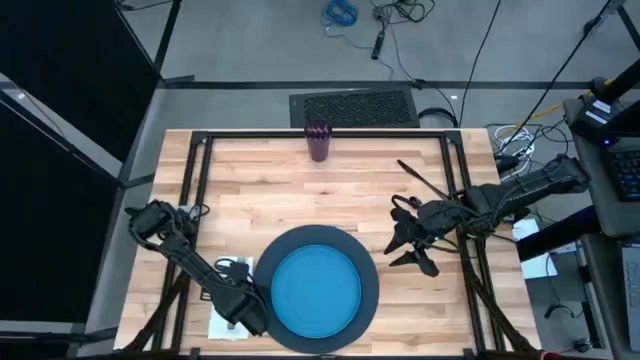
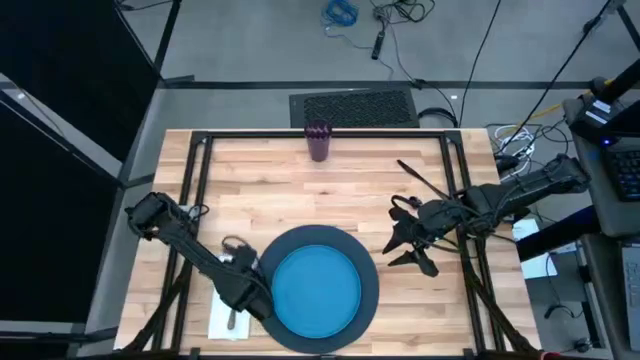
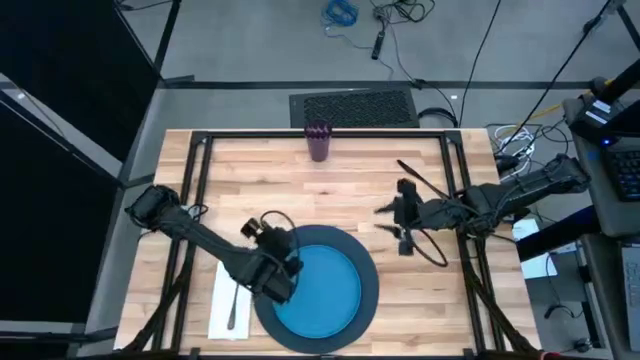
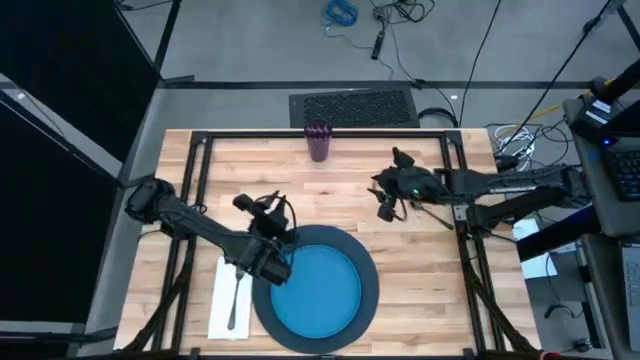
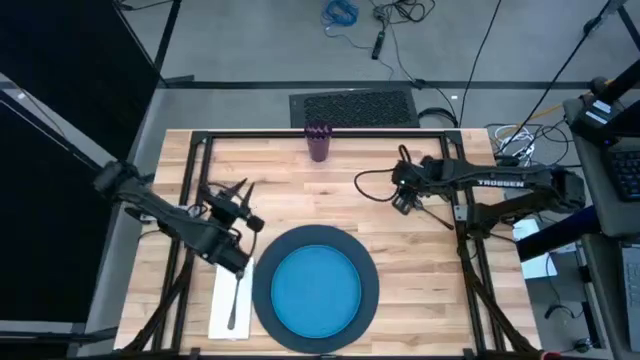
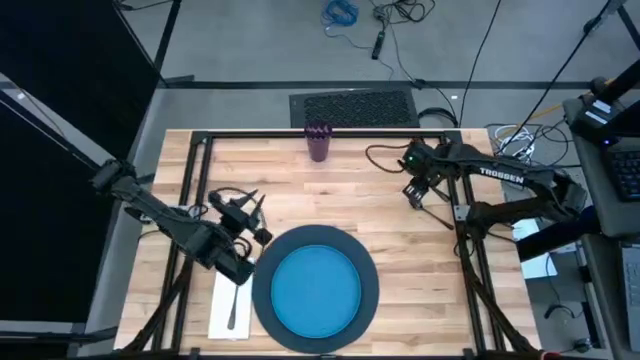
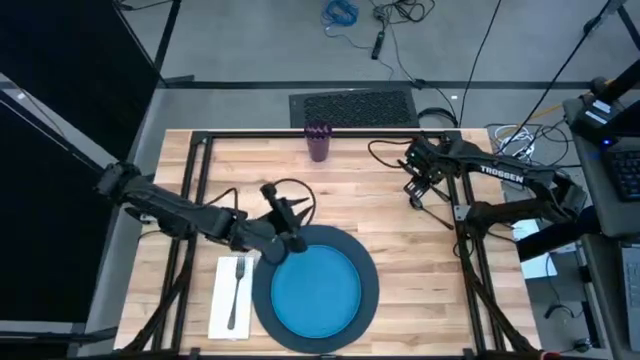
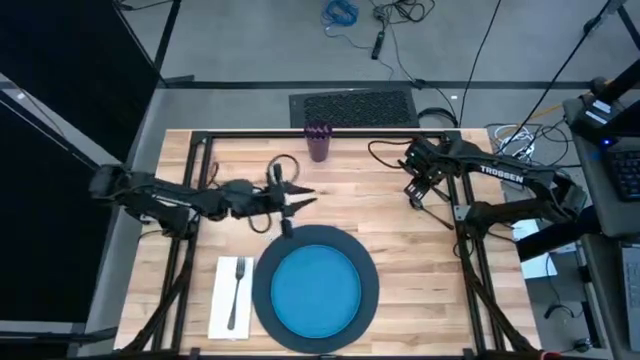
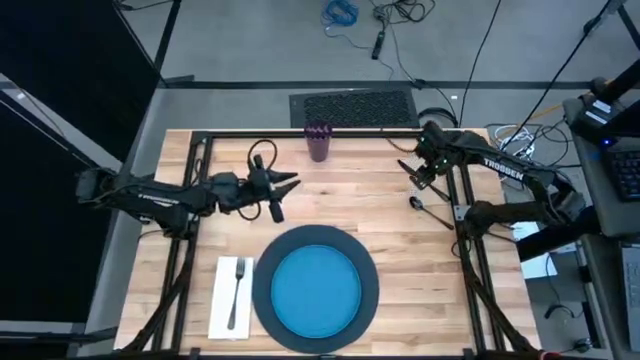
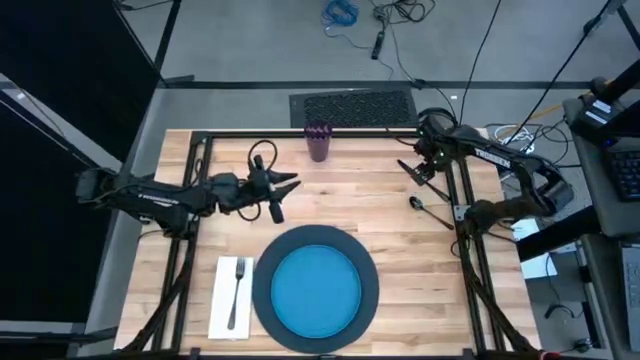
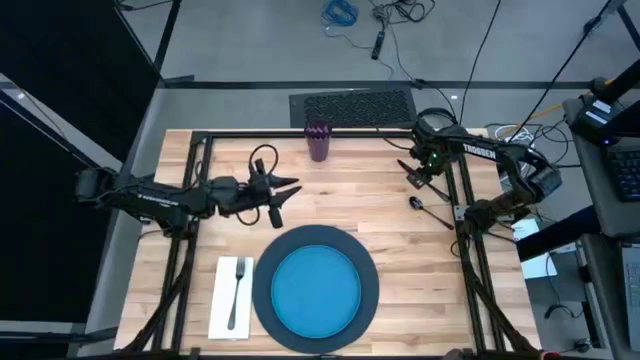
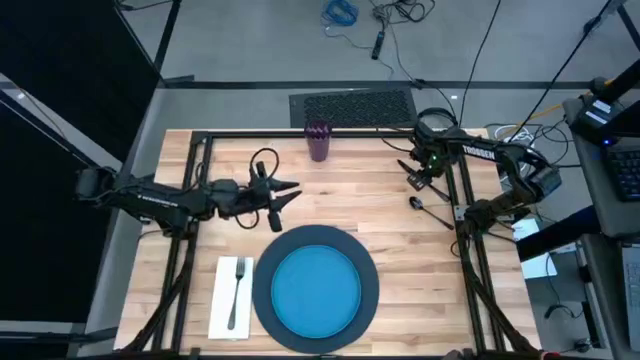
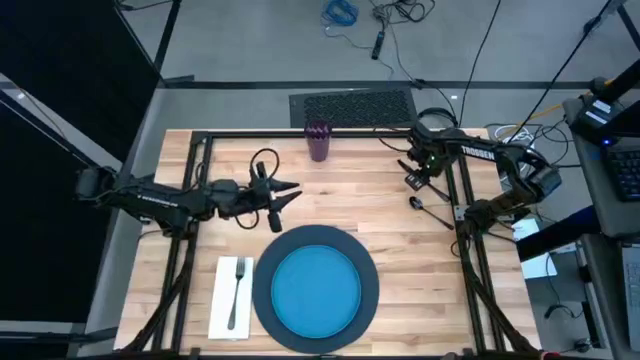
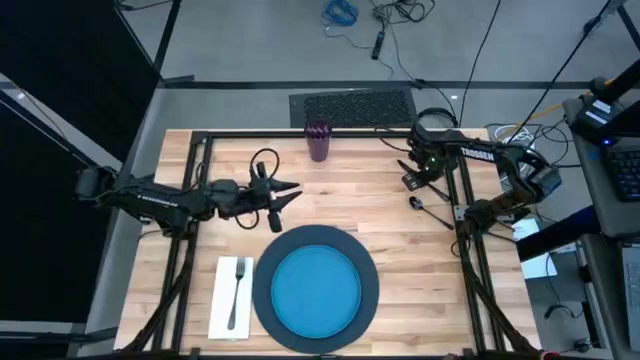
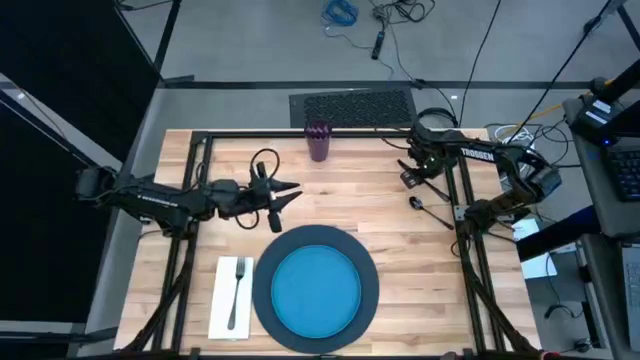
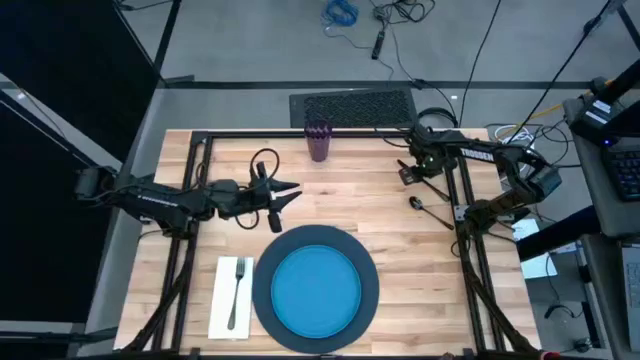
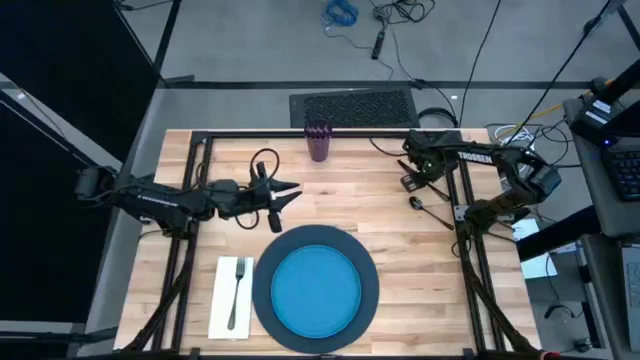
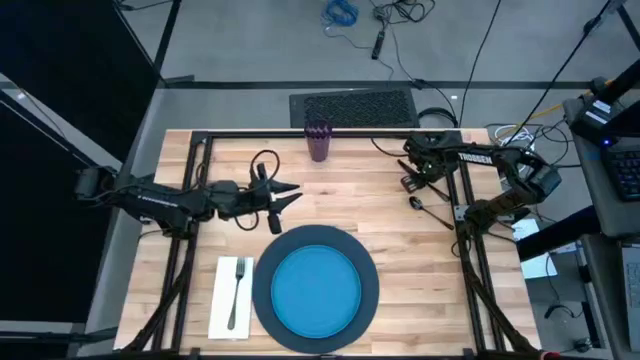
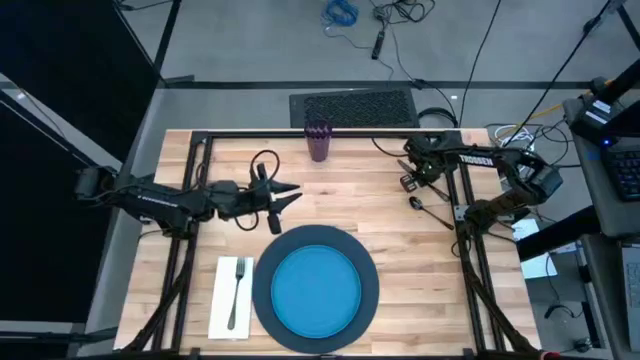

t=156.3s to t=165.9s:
Task: Set table place
Put the black table knife to the right of the dark blue placemat

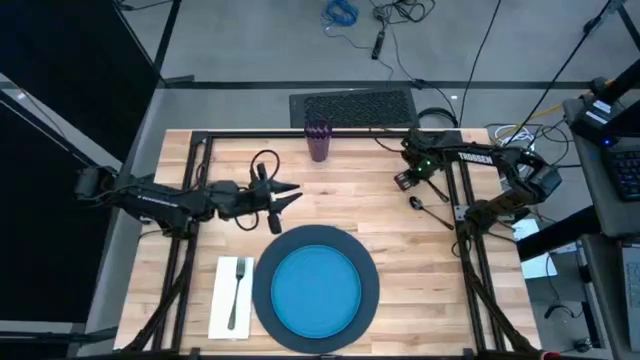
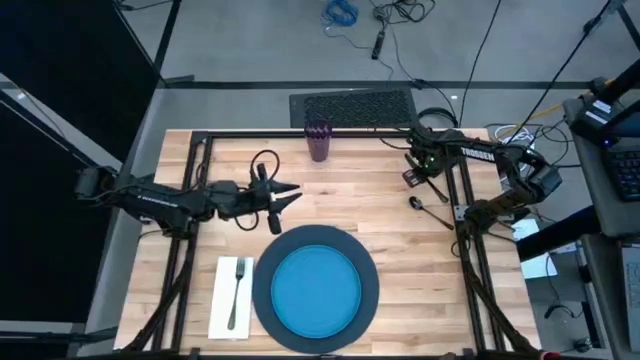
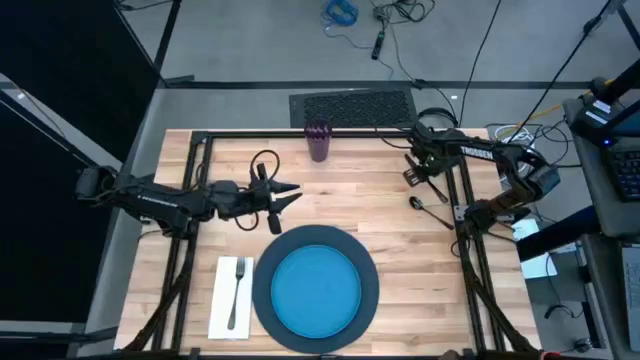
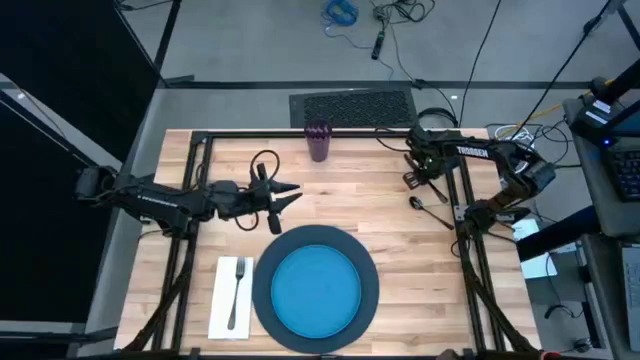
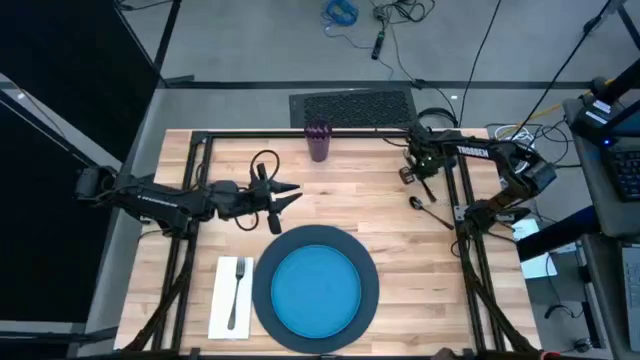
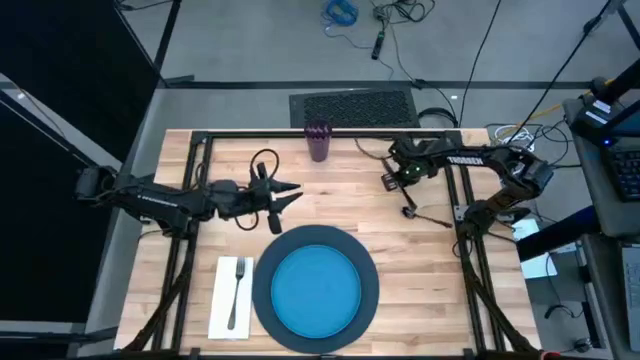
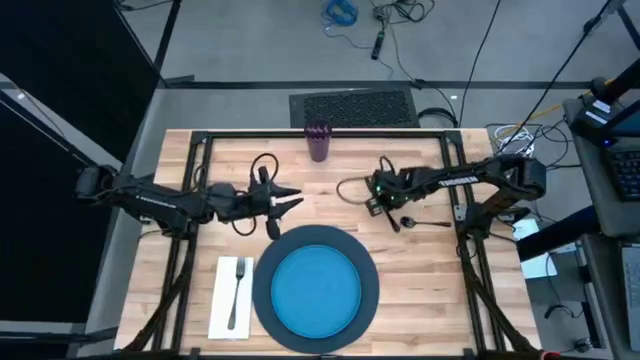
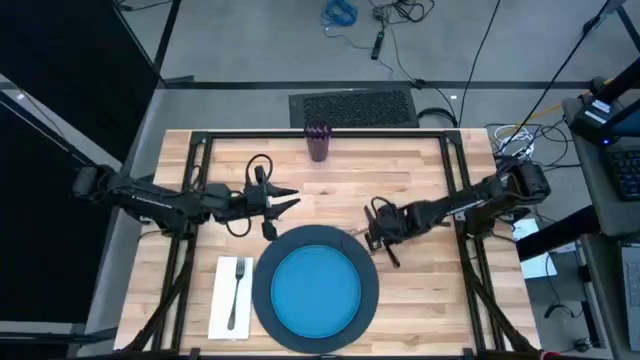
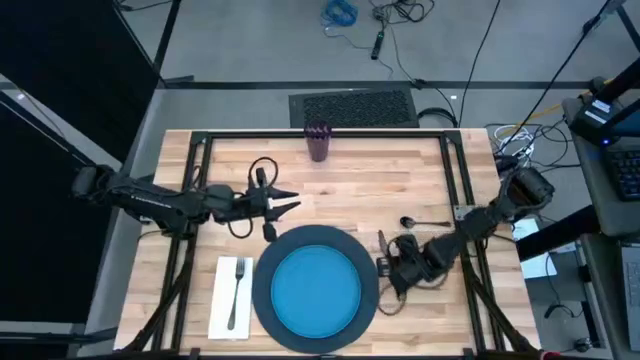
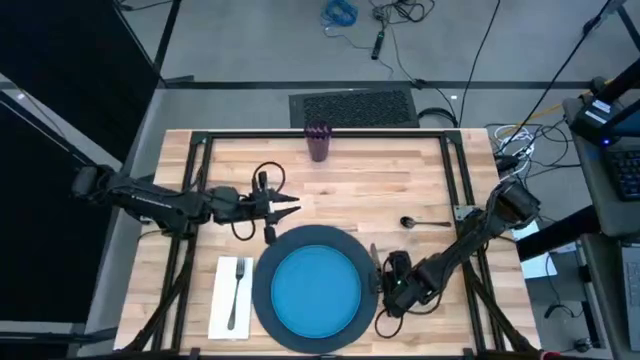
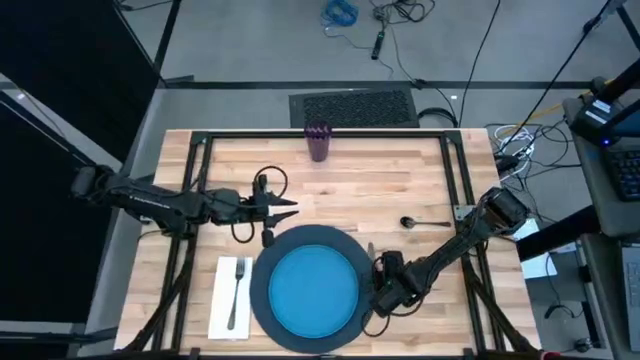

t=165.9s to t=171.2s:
Move the black table knife to the right of the dark blue placemat

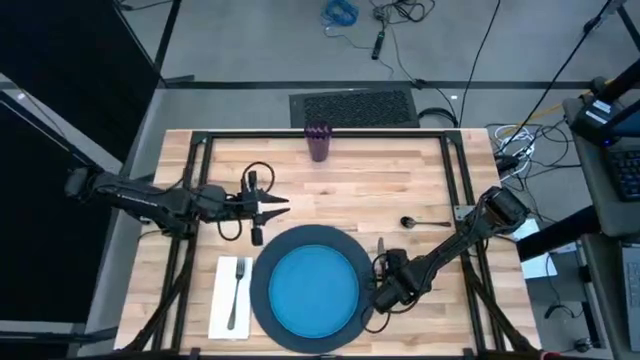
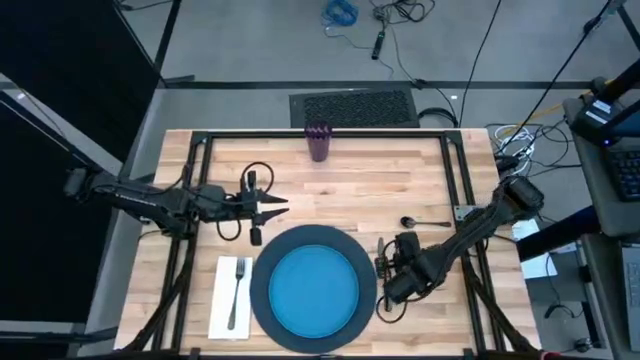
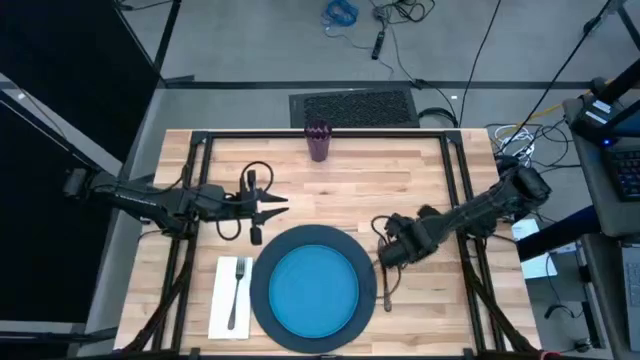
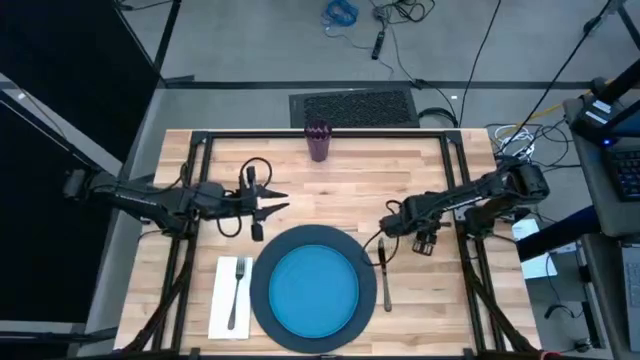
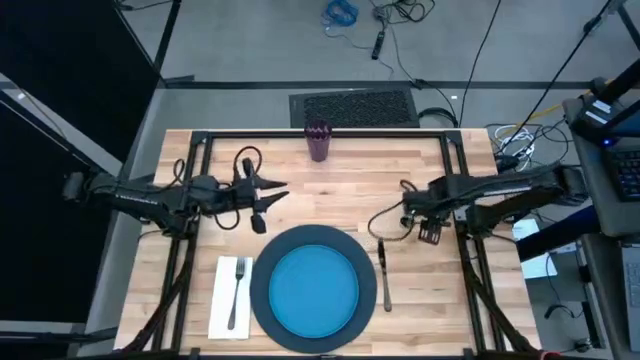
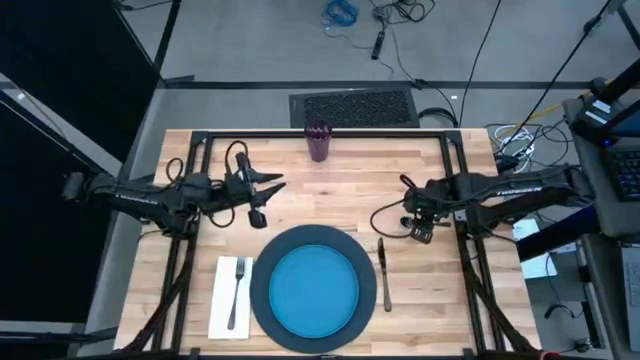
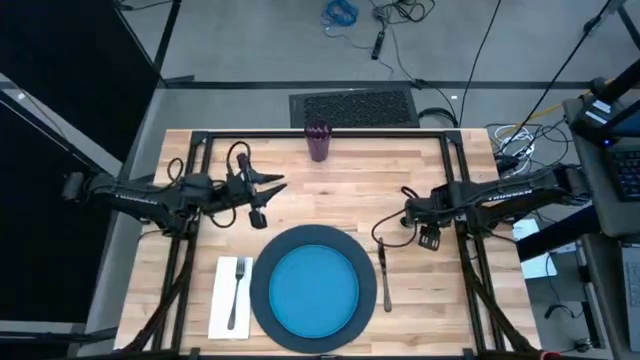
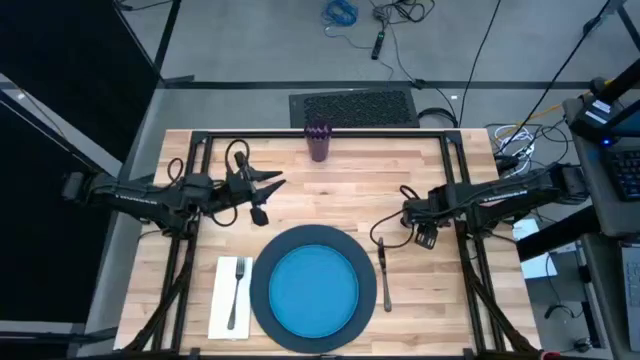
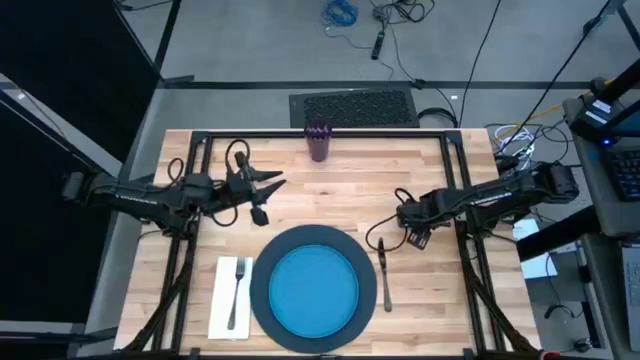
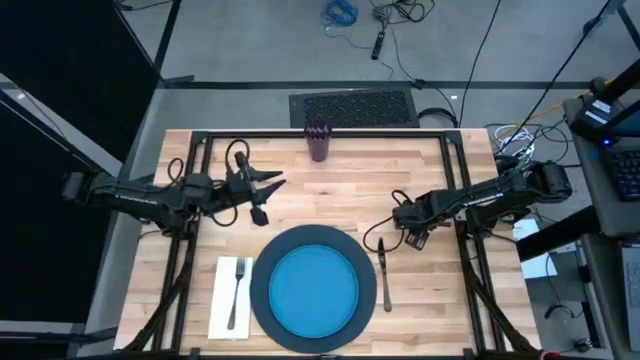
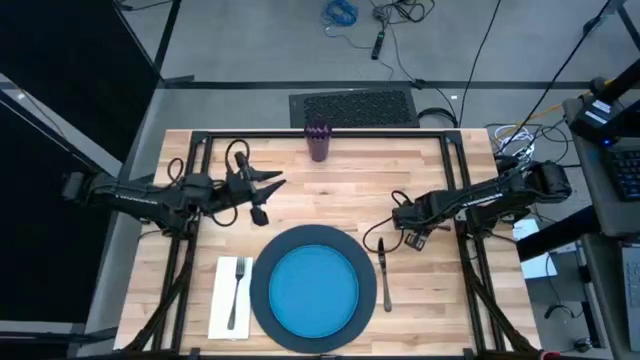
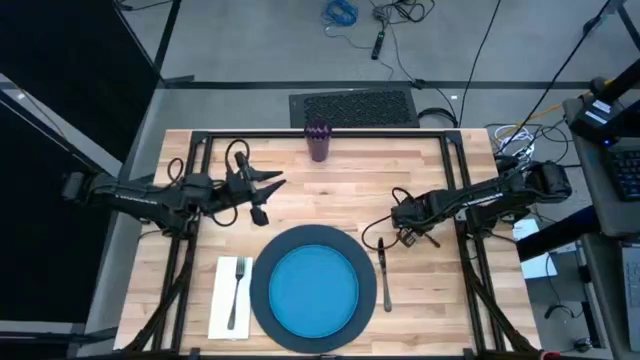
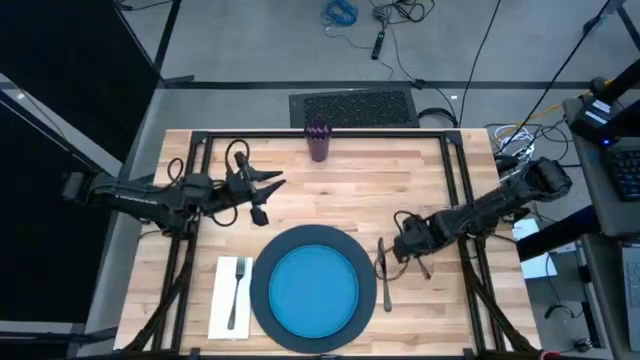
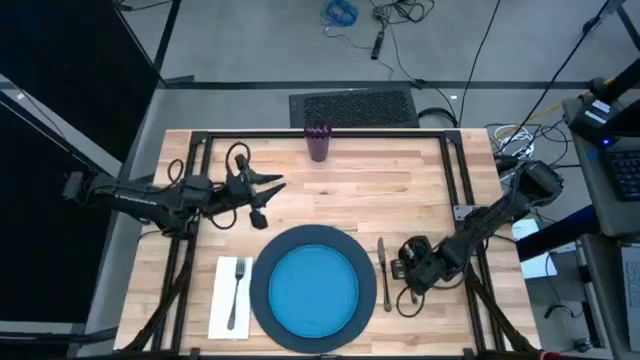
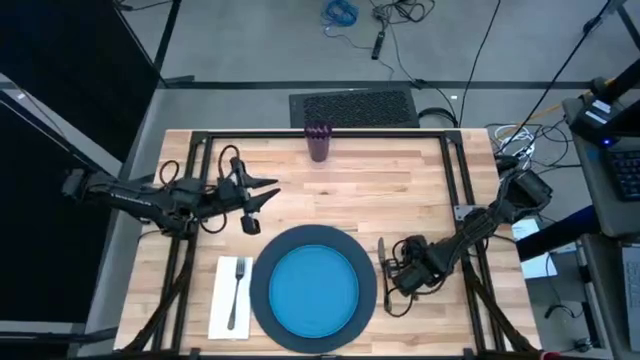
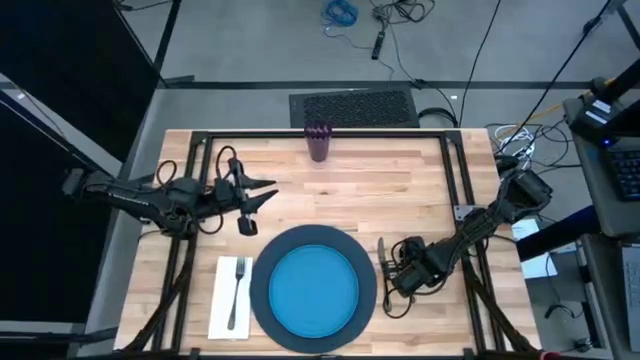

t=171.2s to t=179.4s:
Move the black spoon to the right of the black table knife
